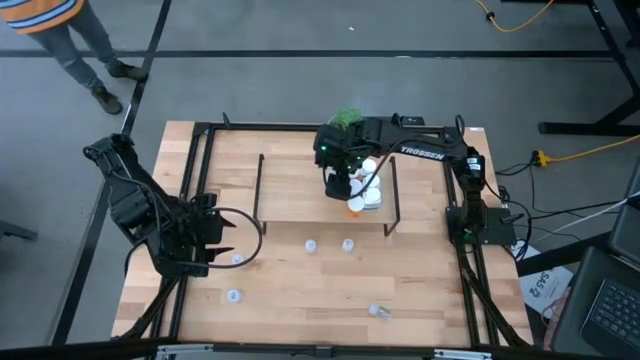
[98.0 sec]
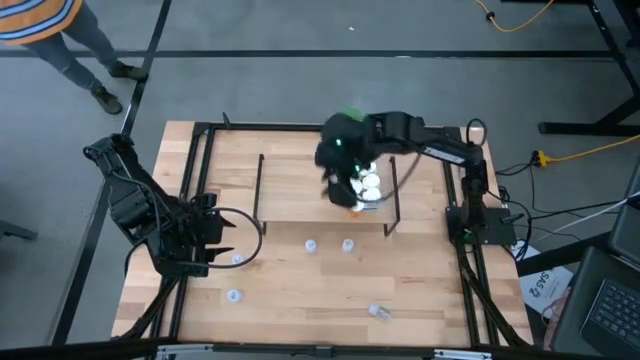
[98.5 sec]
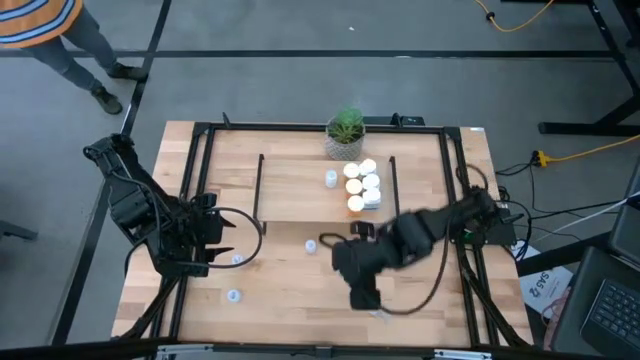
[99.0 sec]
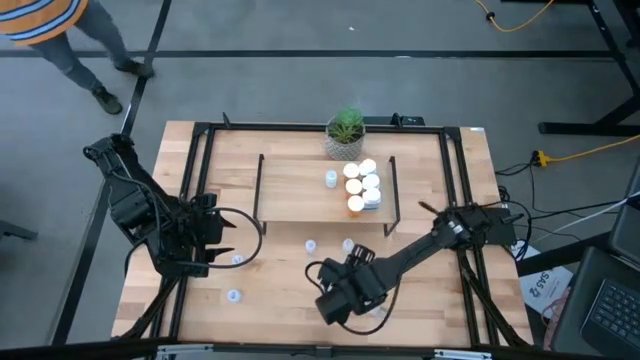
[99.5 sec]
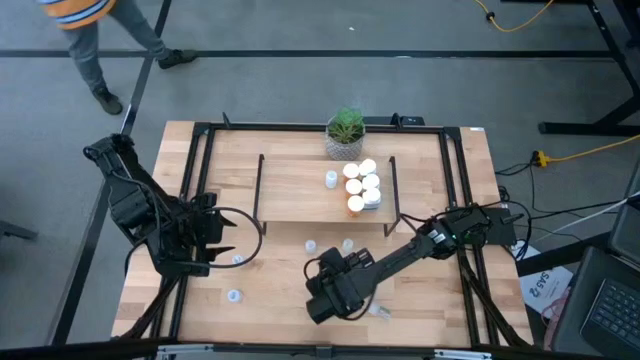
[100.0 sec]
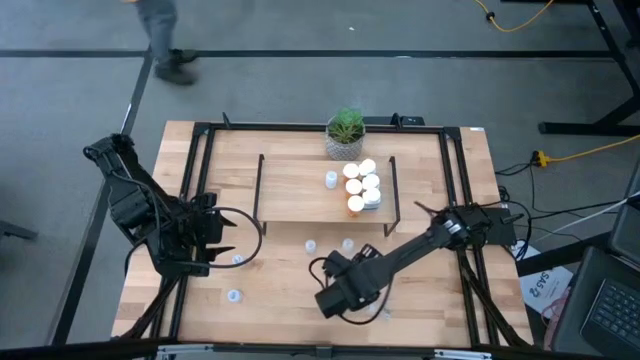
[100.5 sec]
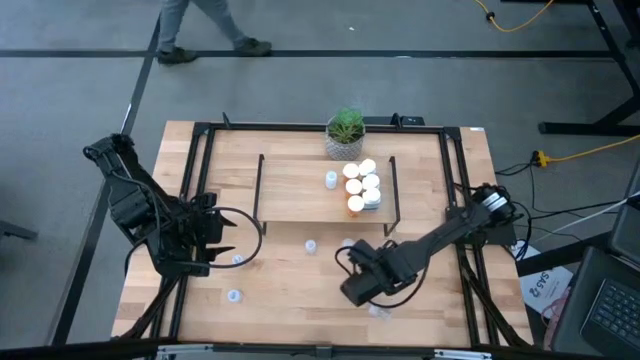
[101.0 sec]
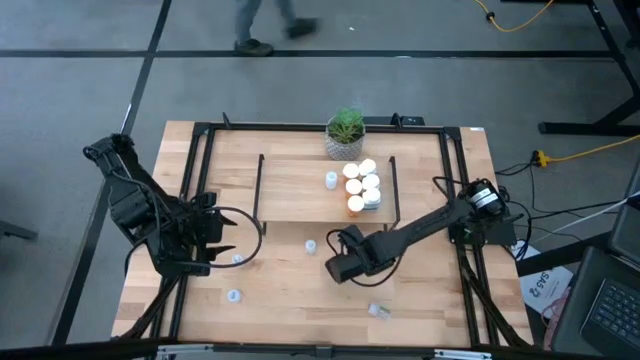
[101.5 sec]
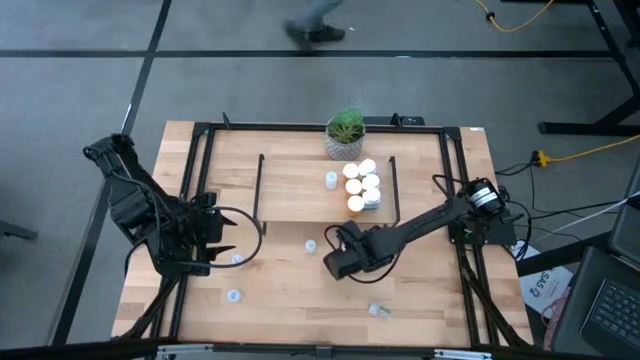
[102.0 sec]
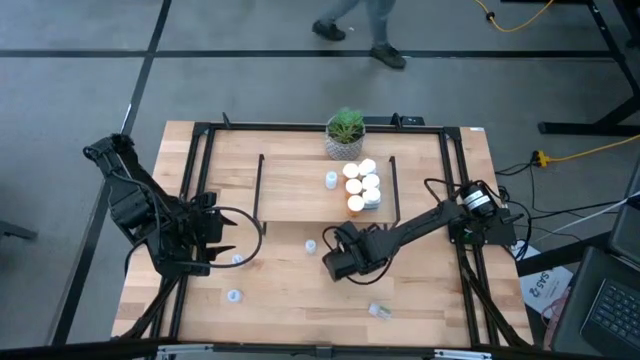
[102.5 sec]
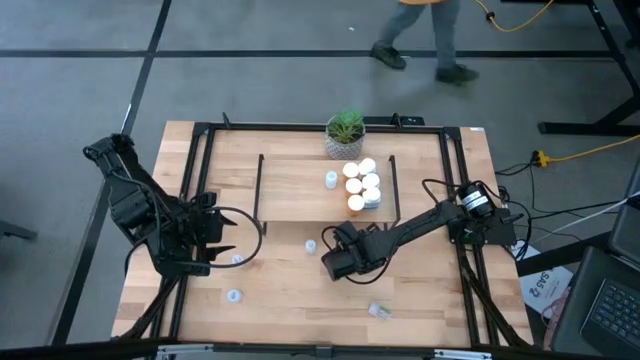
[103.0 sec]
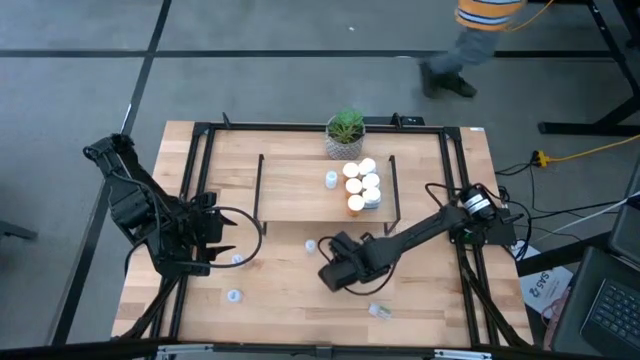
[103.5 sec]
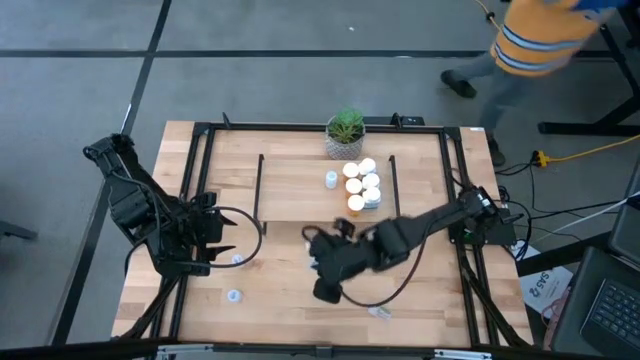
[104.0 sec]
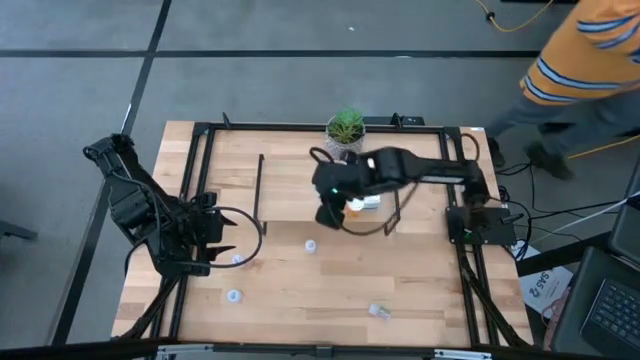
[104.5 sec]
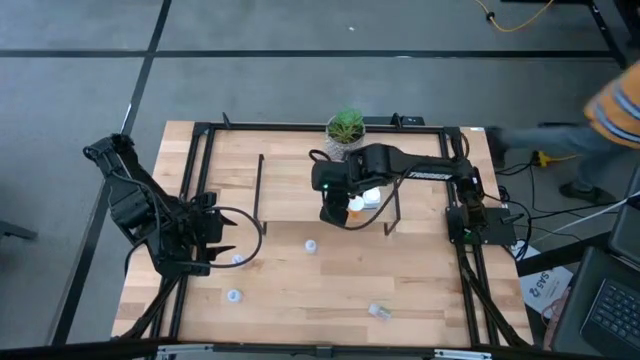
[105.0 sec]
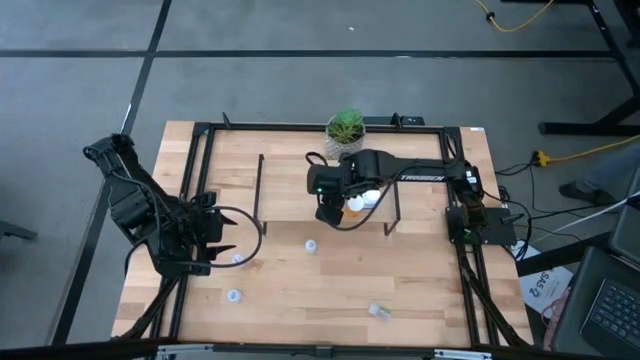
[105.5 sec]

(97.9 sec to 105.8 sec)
Task: Pick and place medicine bottles onto shelf by color
Put the right white pill bottle on the shelf aligned with the other white pill bottle

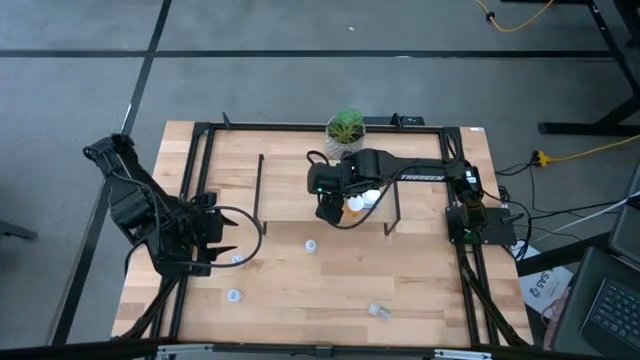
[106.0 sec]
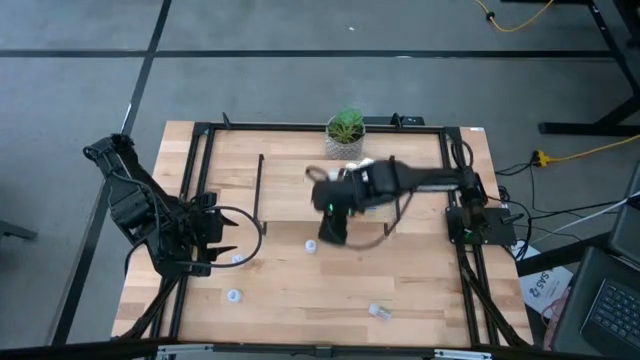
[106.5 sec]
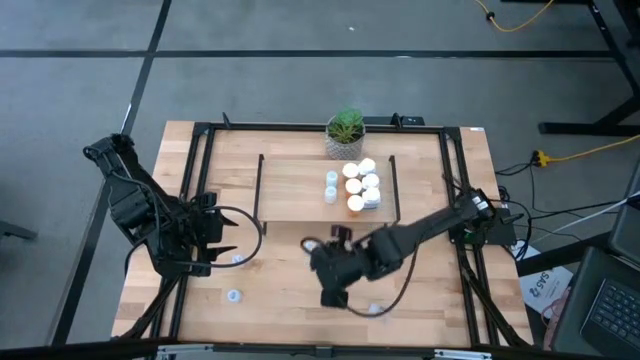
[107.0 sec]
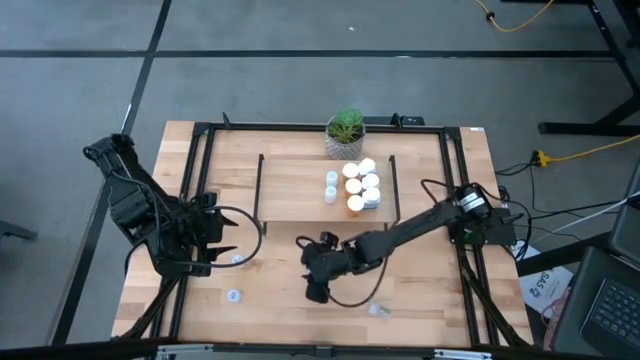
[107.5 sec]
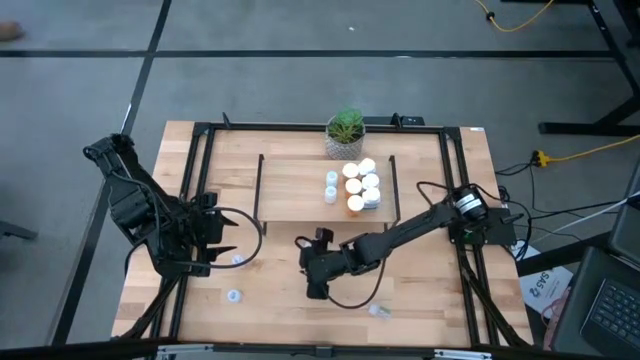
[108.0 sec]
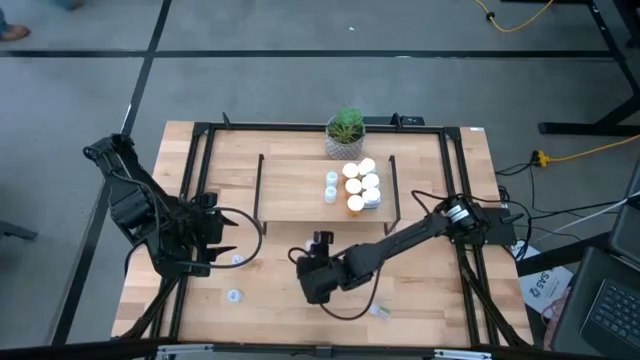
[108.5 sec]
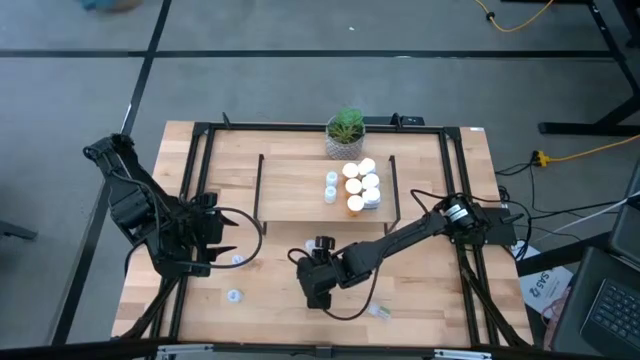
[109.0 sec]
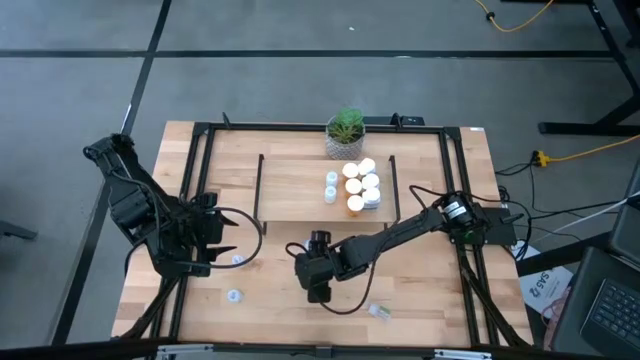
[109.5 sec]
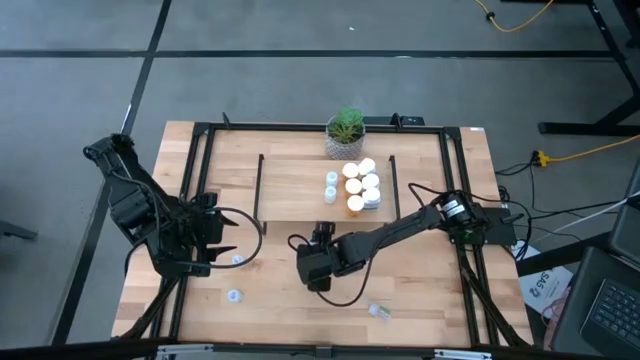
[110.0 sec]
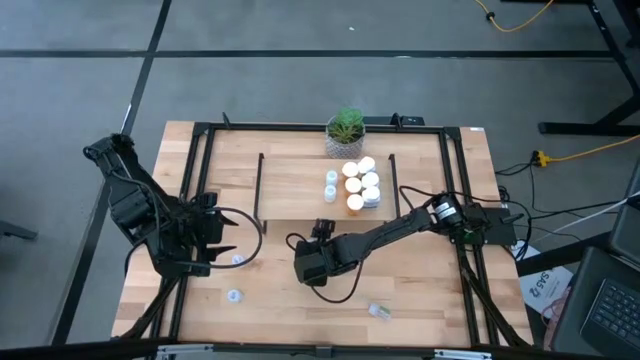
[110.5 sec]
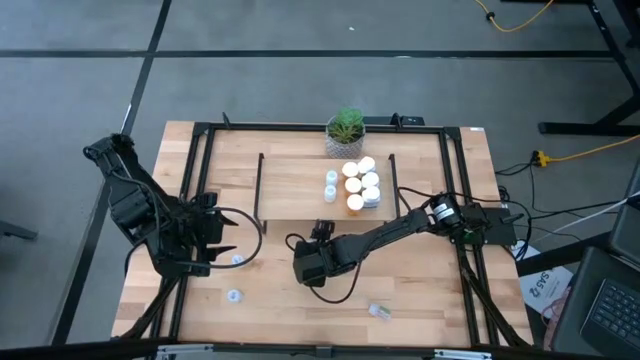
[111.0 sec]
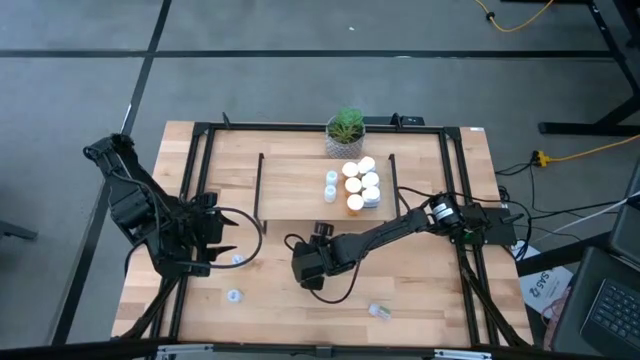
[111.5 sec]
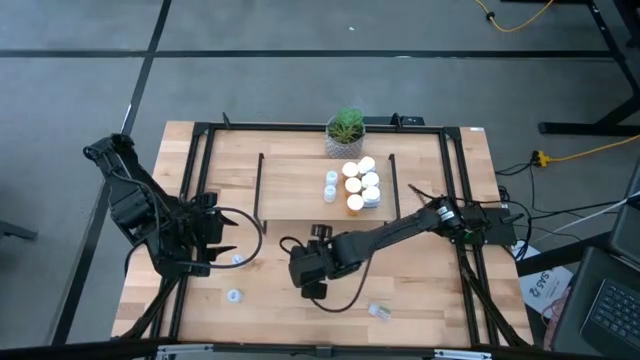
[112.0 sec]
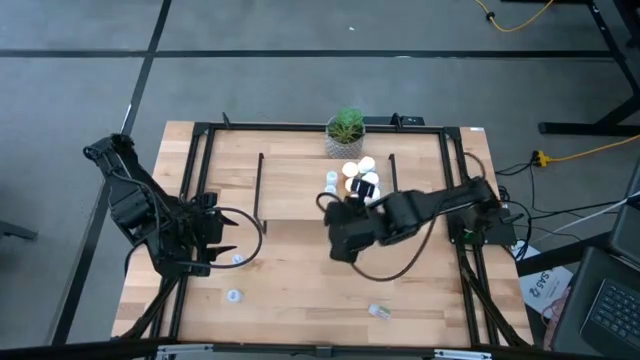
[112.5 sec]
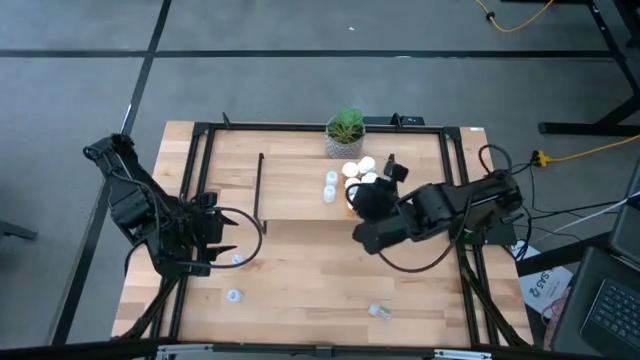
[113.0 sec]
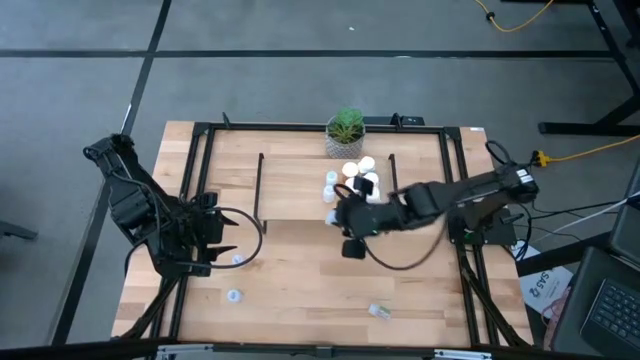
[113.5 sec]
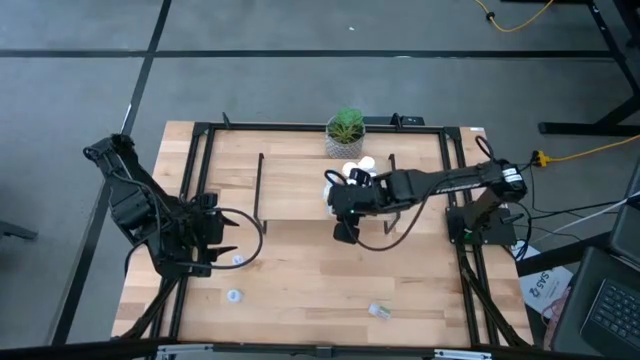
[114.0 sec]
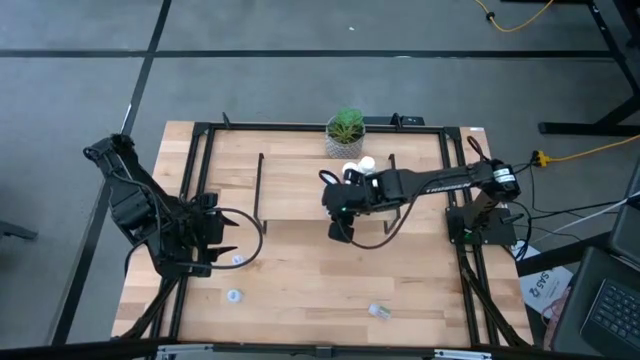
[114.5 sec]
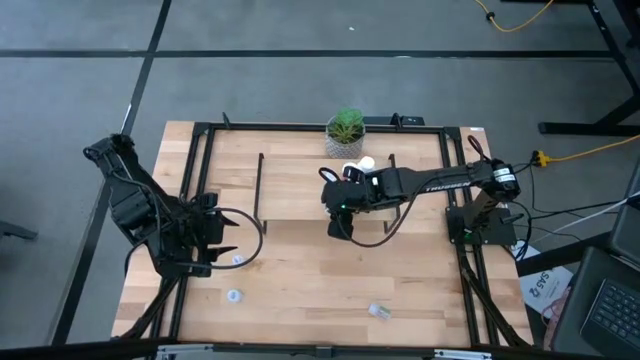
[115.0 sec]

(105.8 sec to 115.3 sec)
Put the white pill bottle on the shelf aligned with the other white pill bottle

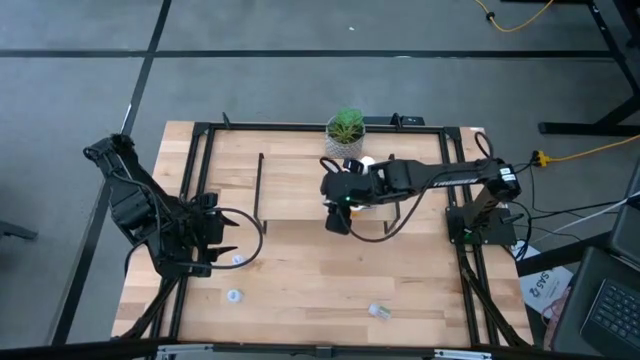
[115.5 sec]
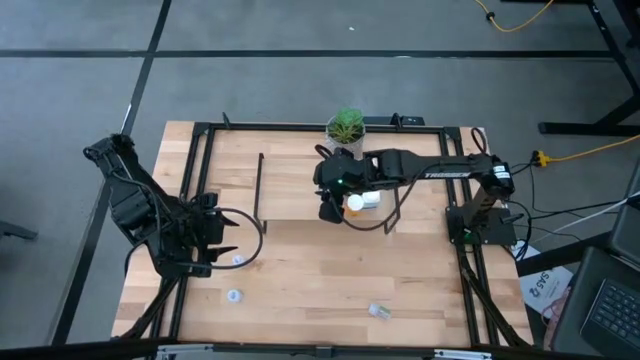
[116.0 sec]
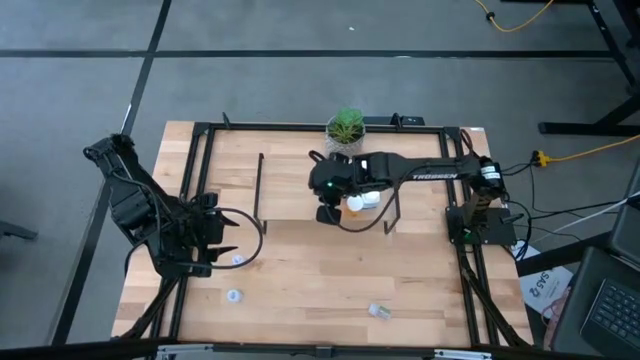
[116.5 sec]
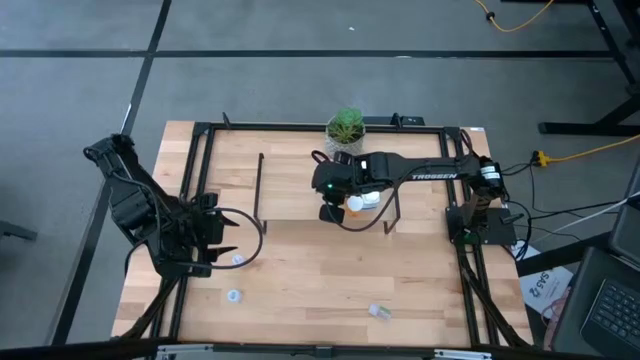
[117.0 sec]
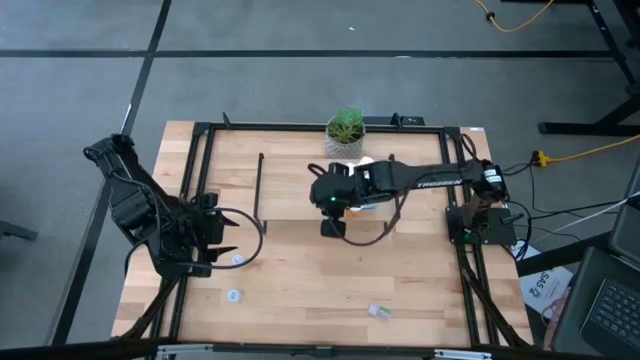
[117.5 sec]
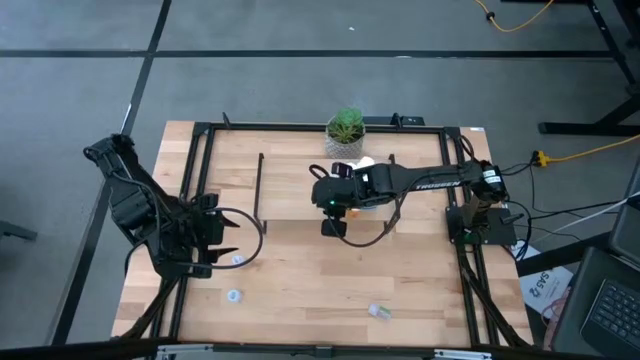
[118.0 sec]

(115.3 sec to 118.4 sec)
Adjust the white pill bottles on the shelf
